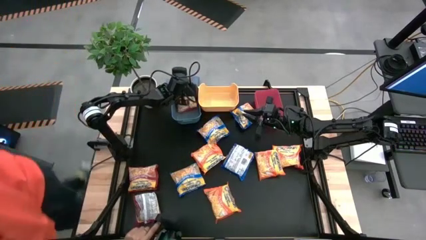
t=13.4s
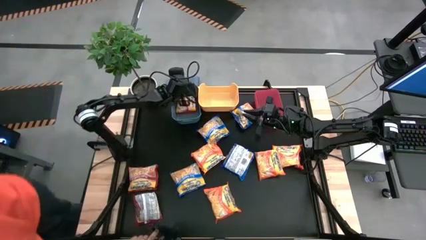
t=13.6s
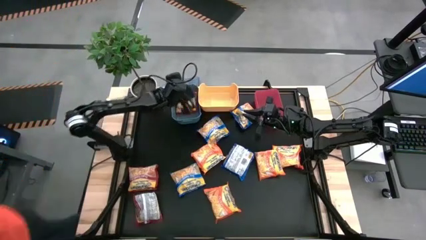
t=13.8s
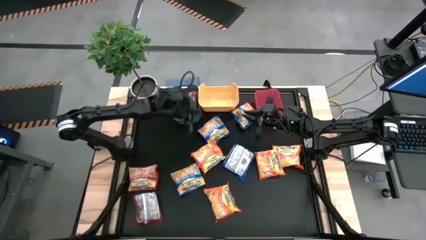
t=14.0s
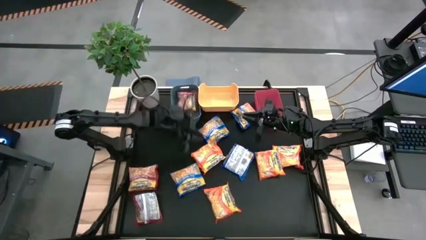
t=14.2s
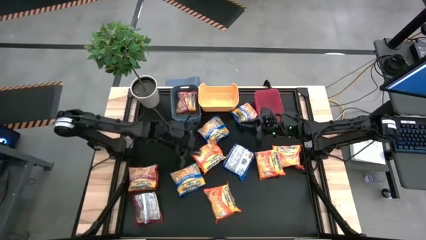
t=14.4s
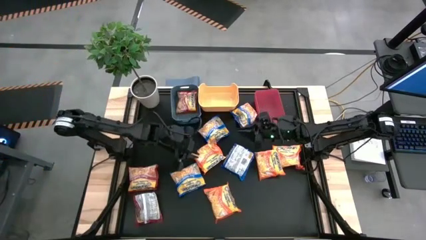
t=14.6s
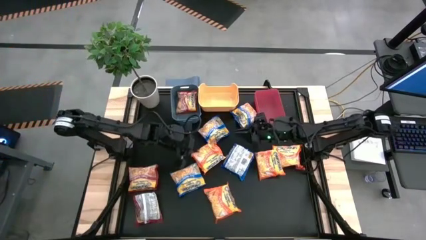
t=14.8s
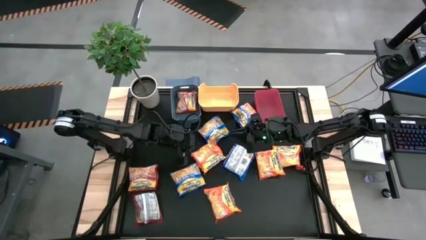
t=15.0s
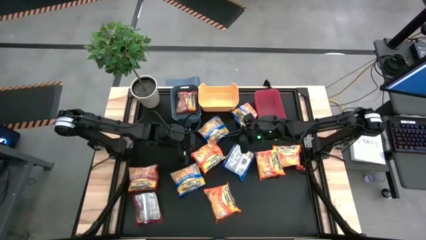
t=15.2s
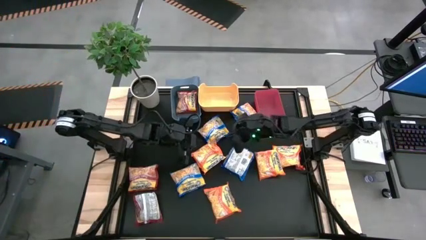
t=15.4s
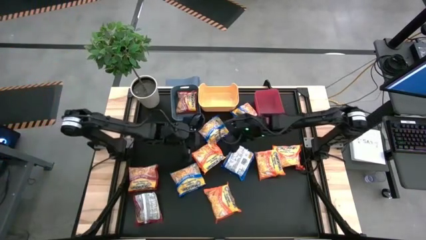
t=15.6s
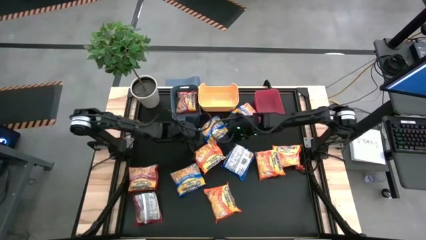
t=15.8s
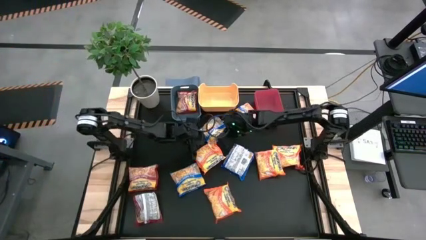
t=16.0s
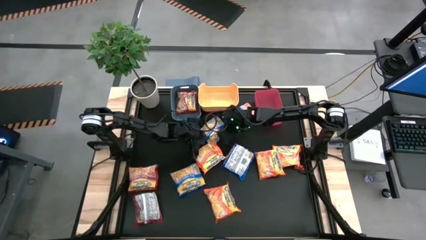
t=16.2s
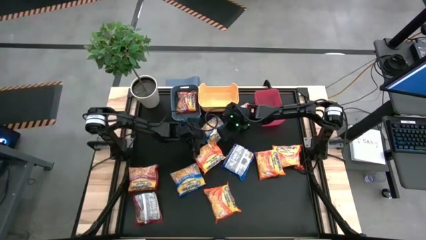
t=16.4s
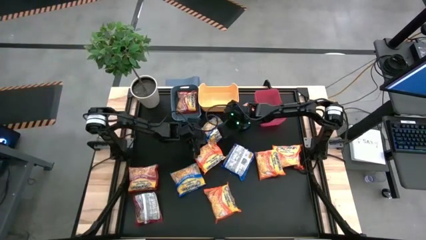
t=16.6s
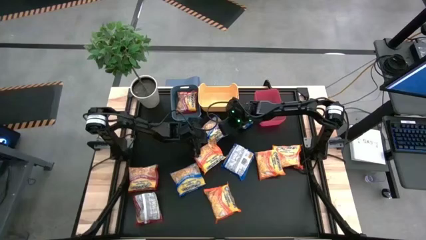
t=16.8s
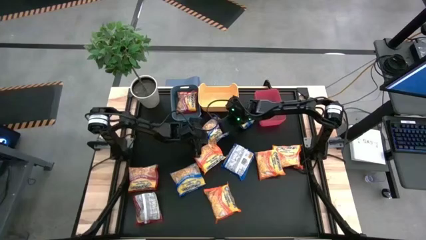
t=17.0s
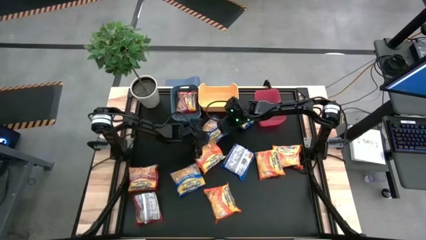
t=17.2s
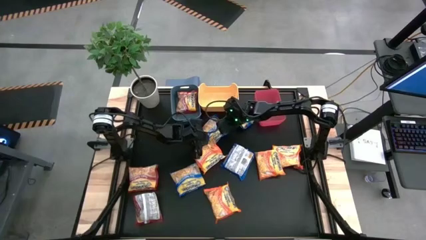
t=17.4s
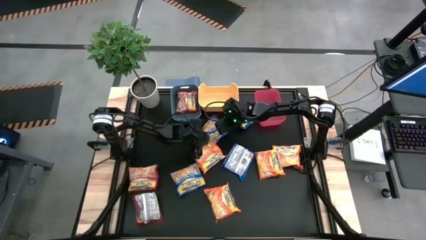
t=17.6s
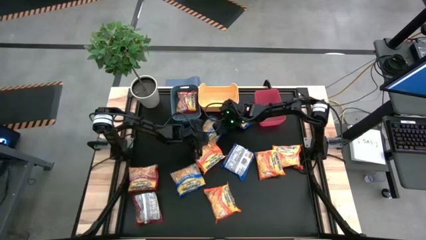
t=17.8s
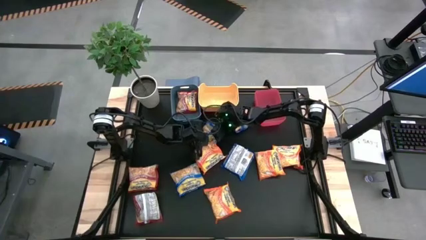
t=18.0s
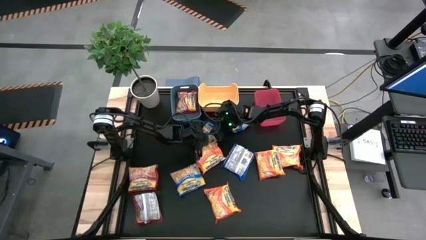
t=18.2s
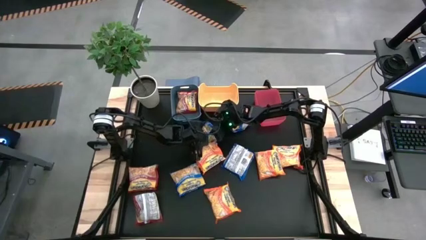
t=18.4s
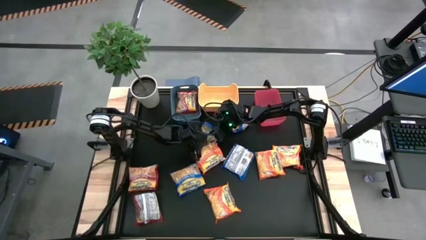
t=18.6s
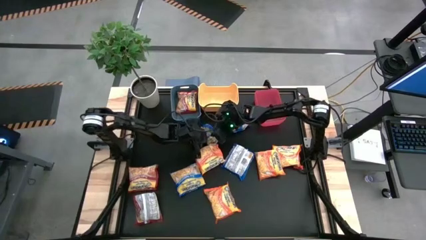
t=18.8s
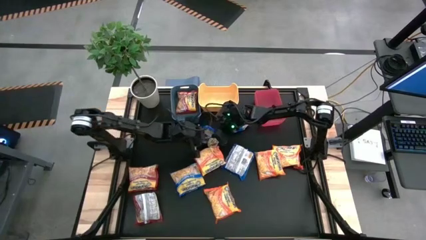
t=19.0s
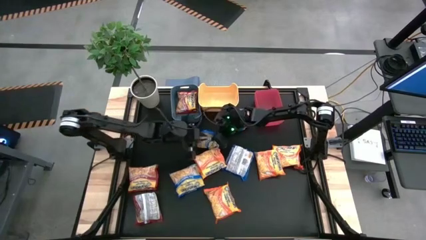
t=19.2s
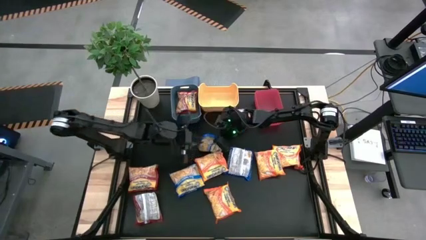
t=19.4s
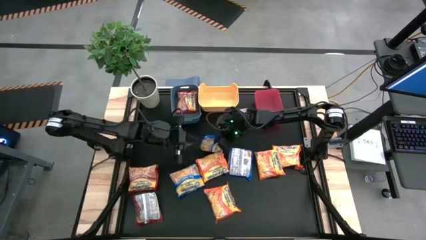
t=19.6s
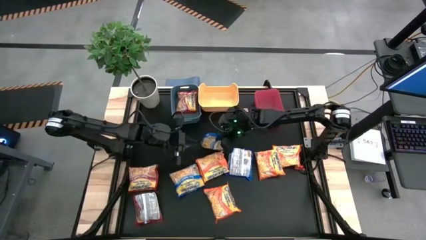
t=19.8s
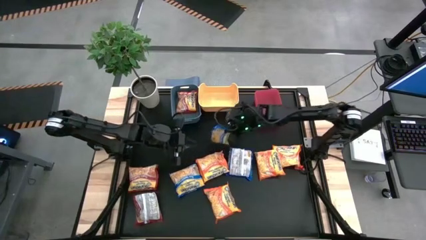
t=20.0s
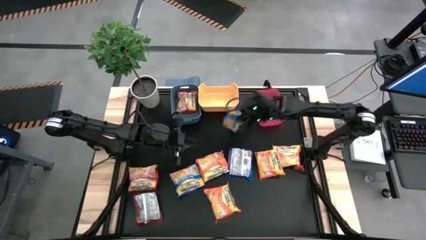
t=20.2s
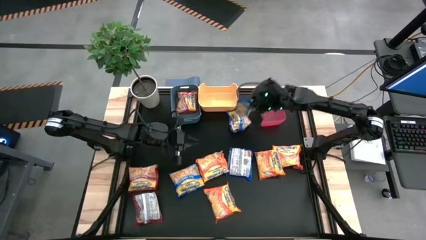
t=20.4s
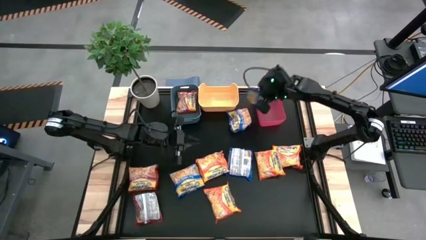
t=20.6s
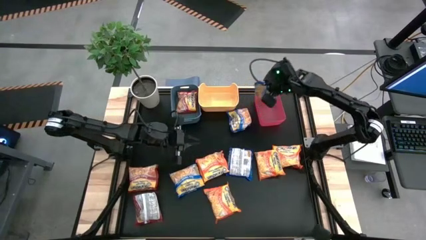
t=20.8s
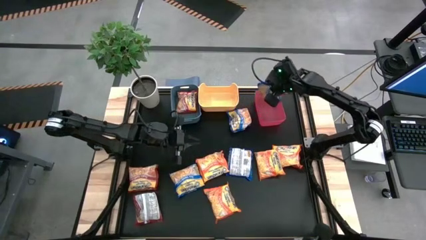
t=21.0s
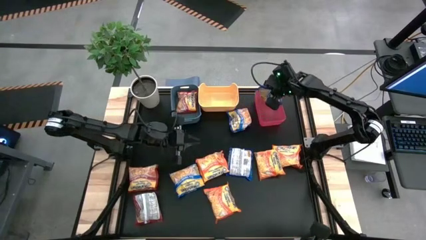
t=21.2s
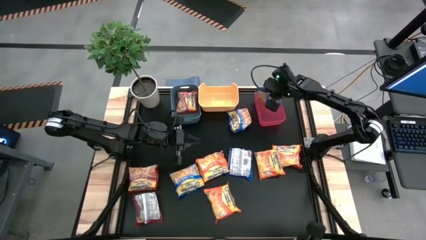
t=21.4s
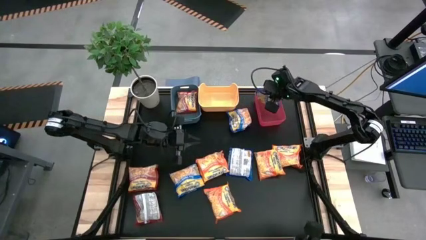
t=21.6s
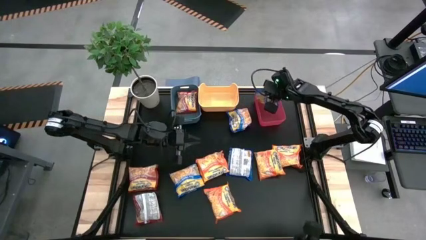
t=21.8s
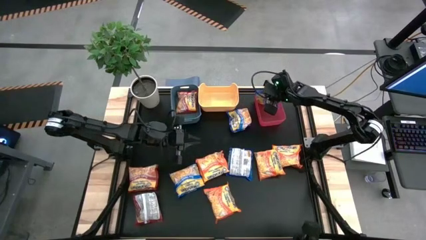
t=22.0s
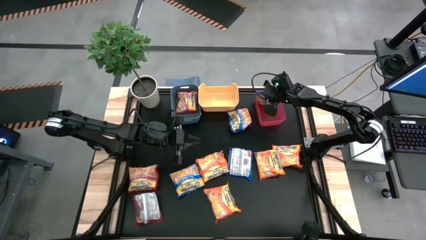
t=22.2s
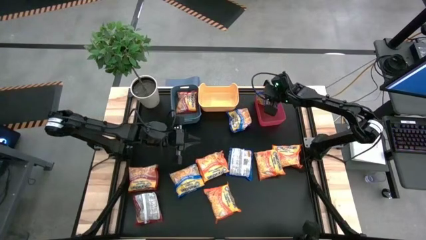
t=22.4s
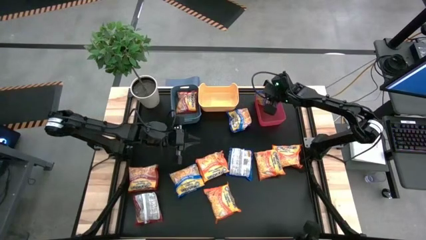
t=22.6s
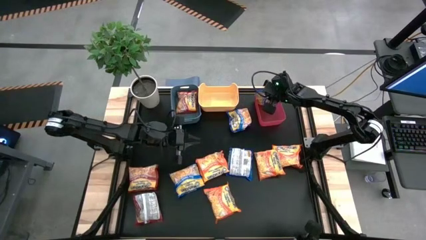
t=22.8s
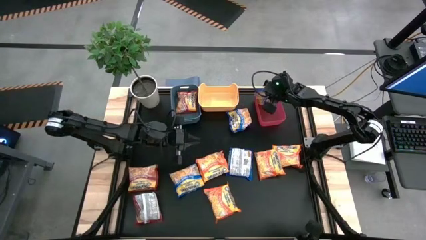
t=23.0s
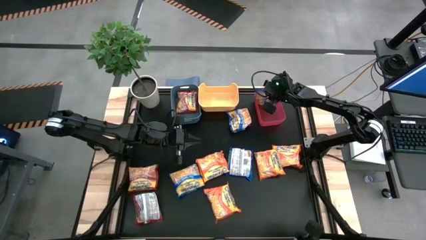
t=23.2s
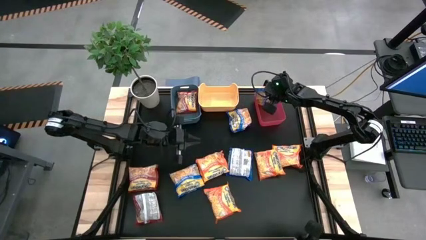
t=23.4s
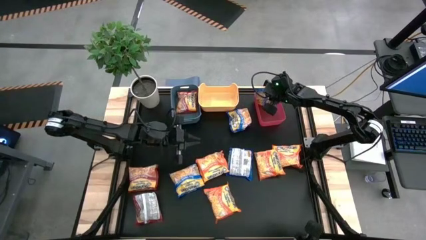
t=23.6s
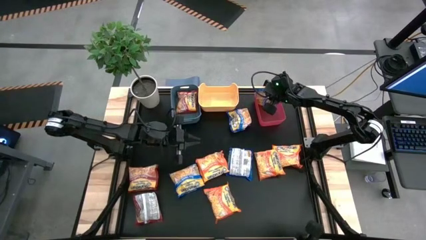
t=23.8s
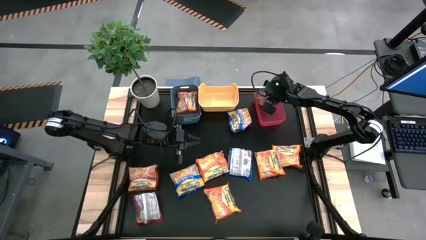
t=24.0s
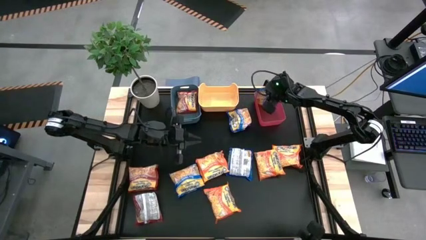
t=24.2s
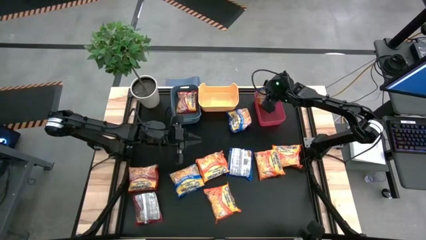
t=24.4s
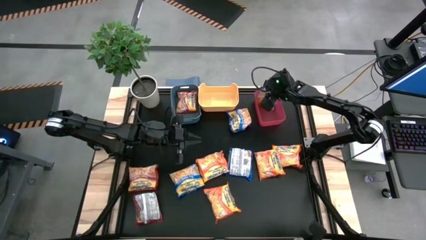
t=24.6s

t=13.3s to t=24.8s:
Task: Sort Maruchan noodles
Put the blue noodle pack into the red bin

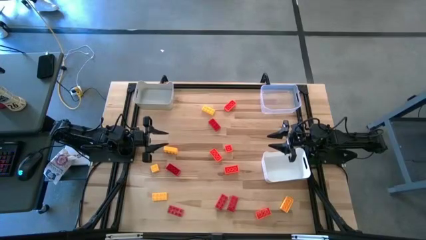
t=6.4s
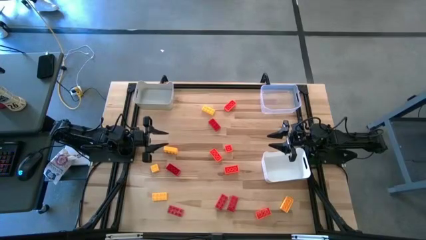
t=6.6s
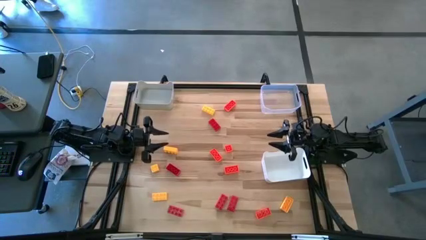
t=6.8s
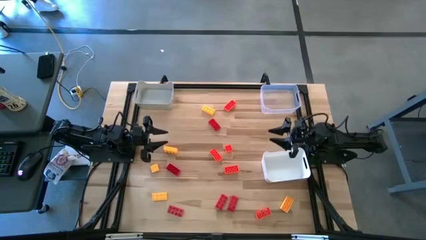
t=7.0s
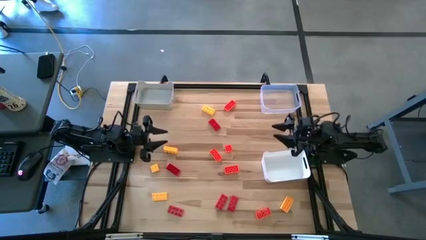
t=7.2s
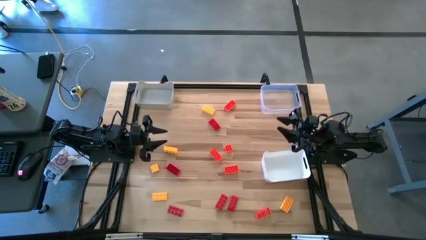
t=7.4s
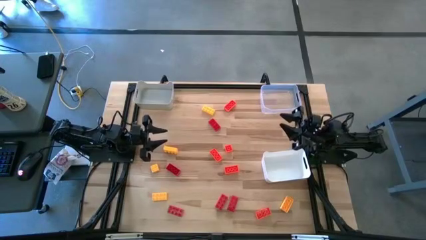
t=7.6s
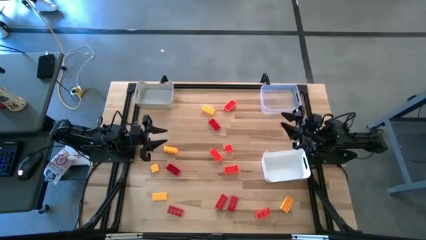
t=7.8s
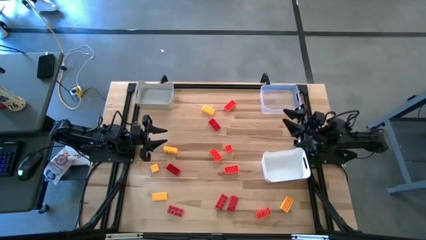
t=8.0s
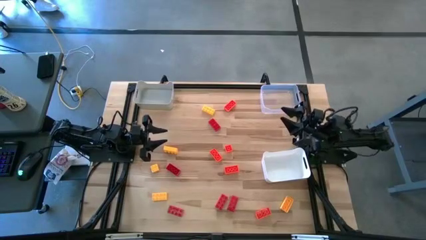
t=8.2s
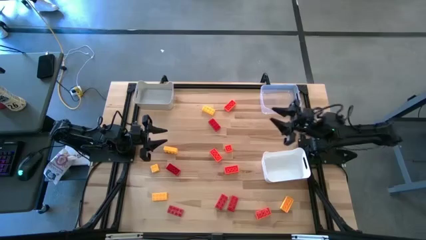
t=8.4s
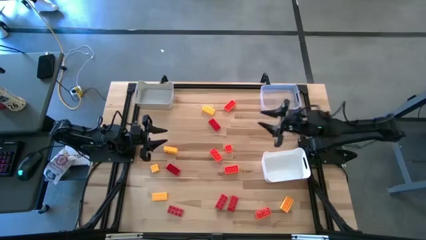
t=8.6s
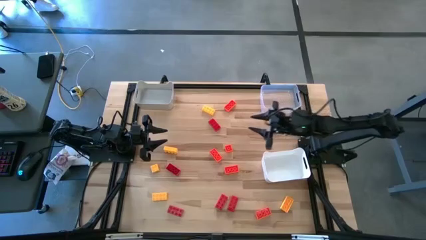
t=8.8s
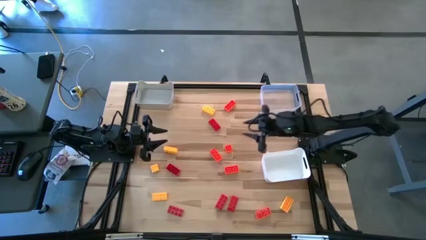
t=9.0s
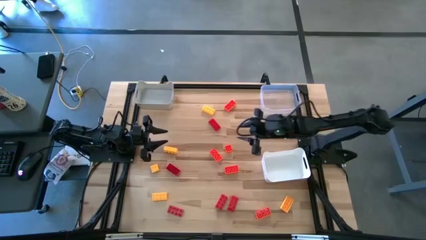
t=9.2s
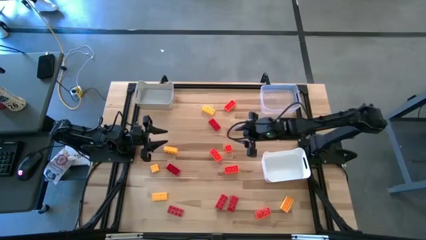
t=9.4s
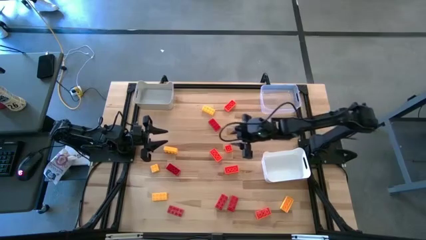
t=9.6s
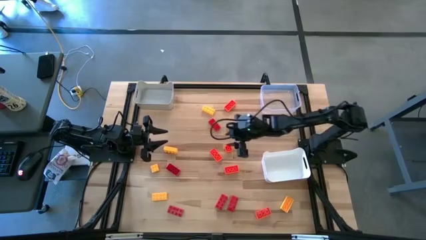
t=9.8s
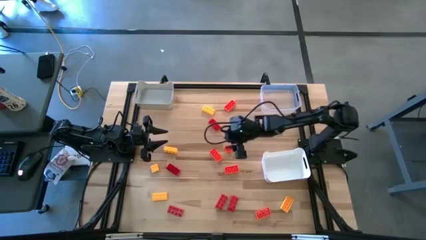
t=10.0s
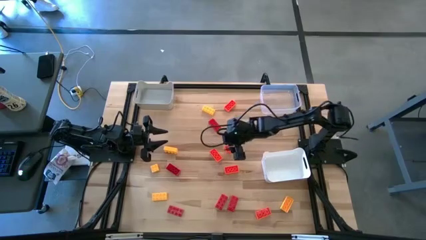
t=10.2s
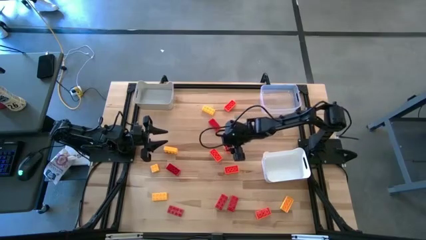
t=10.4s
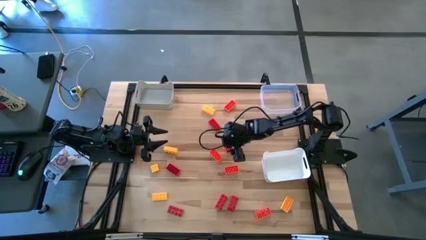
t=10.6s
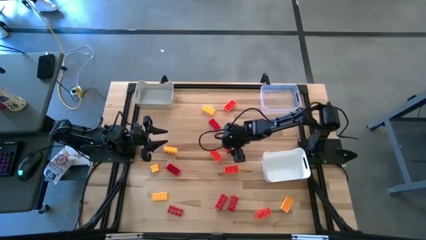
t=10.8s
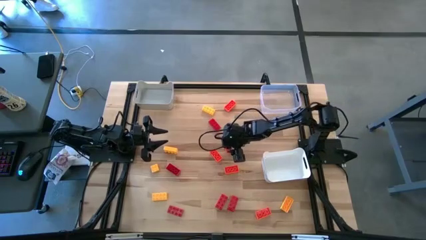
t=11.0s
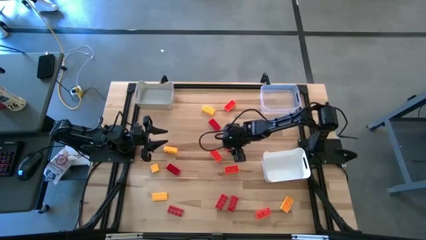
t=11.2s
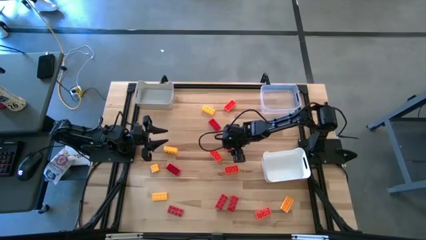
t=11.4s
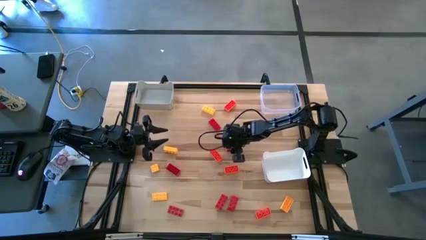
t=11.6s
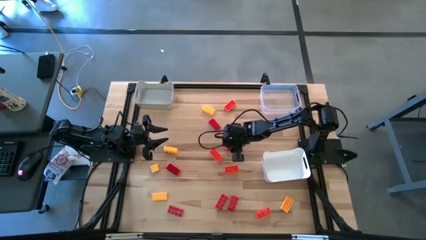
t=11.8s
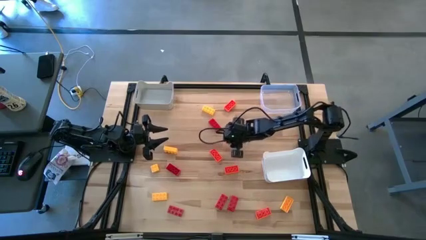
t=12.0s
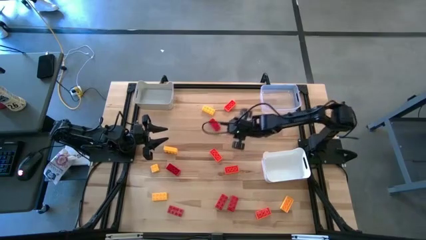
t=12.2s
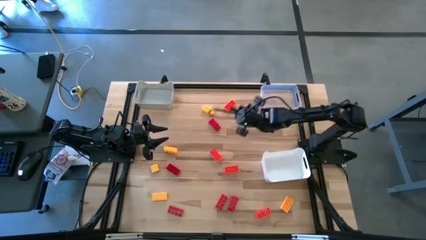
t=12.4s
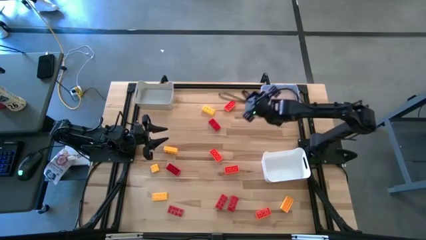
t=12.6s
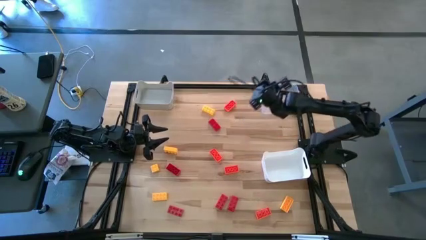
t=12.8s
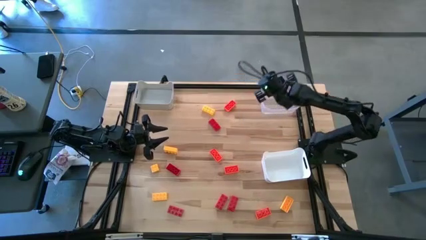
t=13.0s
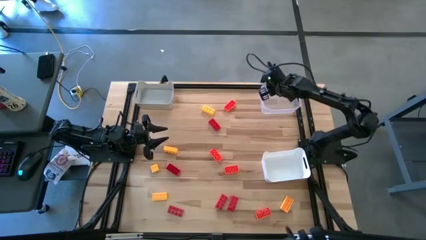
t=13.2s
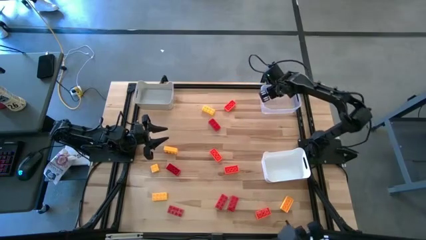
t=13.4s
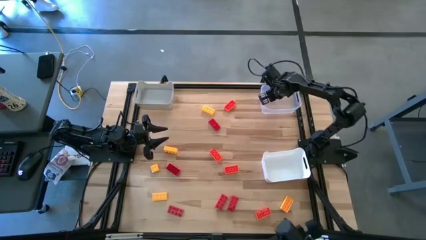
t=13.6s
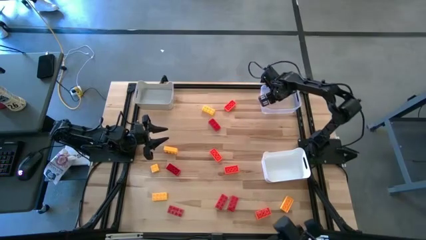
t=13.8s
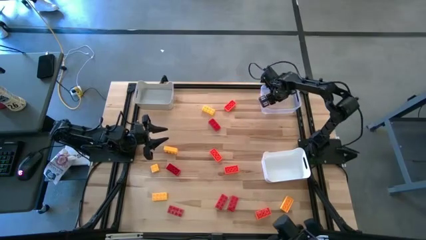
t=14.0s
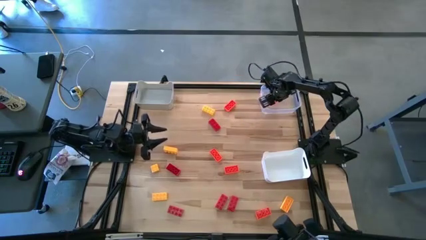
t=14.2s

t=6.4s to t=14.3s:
Task: Sort & place blocks by color
Put the orange block into the transparent bin
